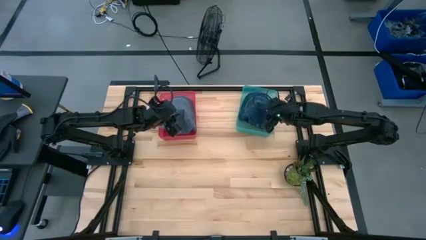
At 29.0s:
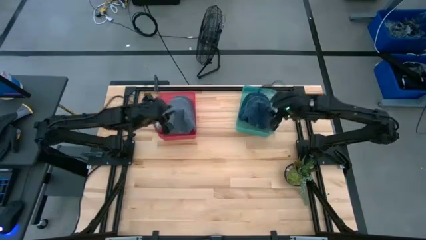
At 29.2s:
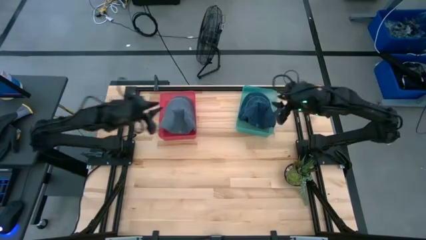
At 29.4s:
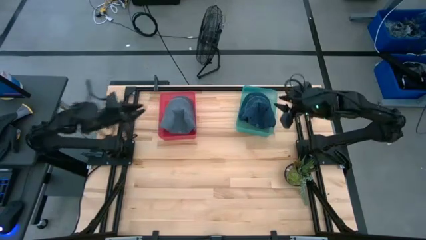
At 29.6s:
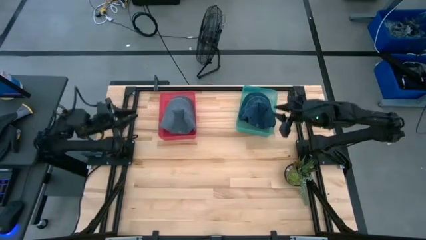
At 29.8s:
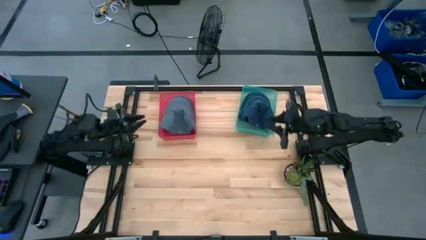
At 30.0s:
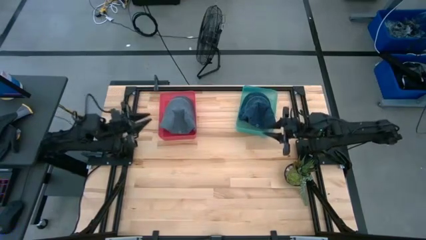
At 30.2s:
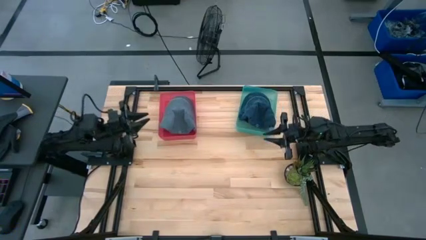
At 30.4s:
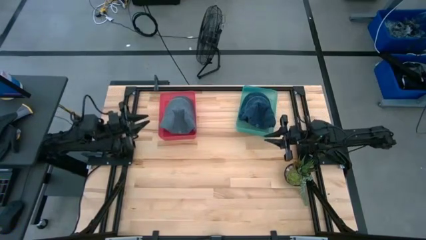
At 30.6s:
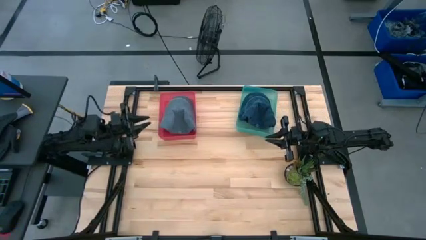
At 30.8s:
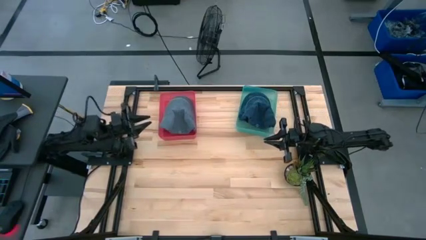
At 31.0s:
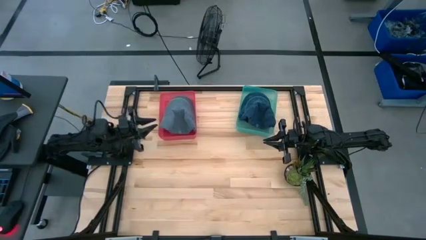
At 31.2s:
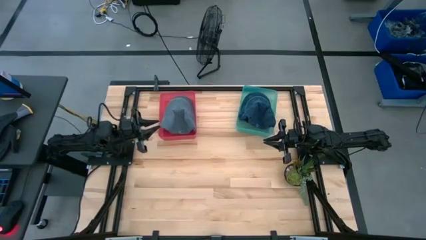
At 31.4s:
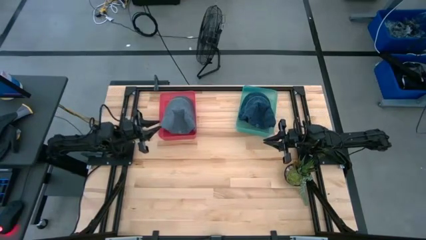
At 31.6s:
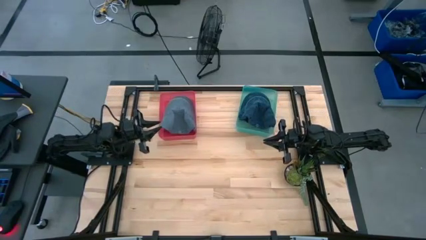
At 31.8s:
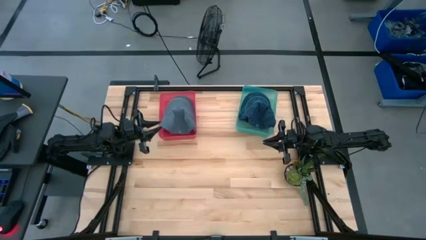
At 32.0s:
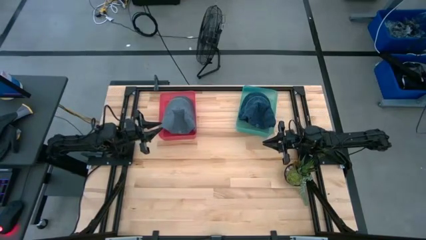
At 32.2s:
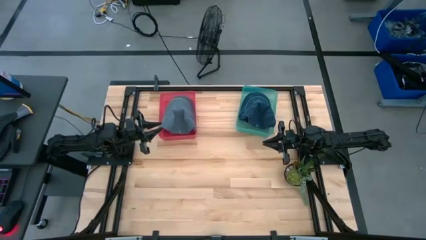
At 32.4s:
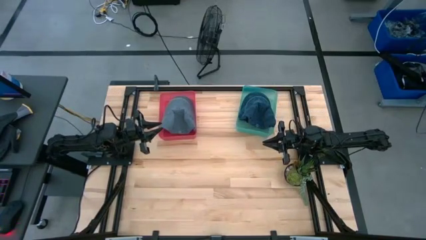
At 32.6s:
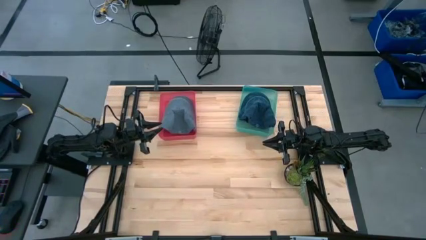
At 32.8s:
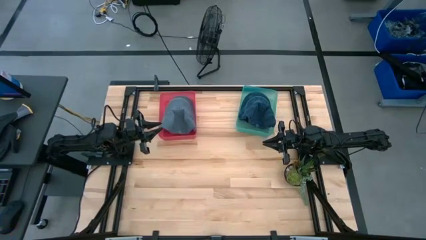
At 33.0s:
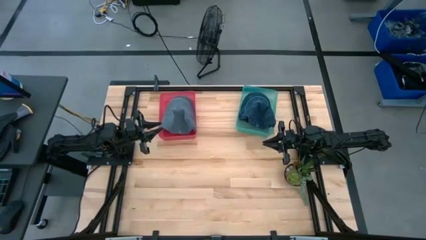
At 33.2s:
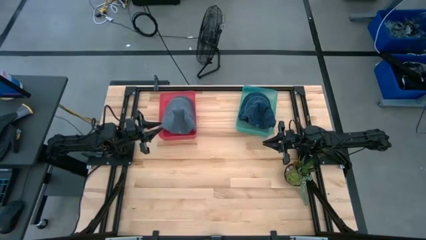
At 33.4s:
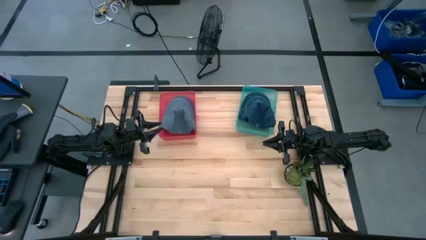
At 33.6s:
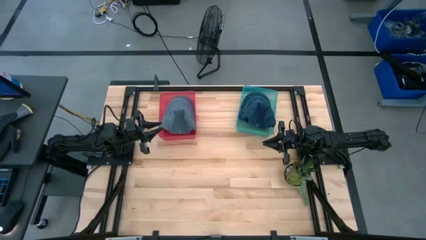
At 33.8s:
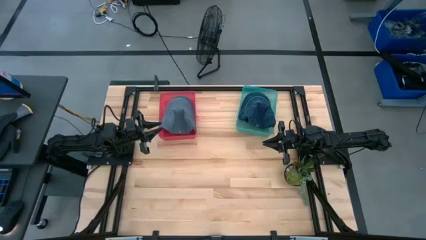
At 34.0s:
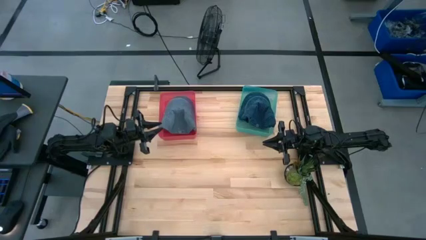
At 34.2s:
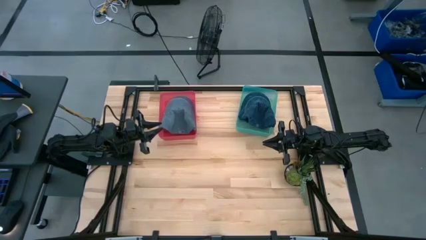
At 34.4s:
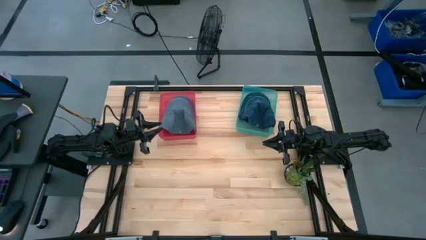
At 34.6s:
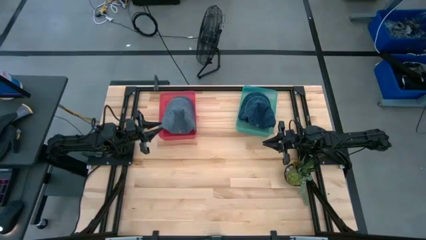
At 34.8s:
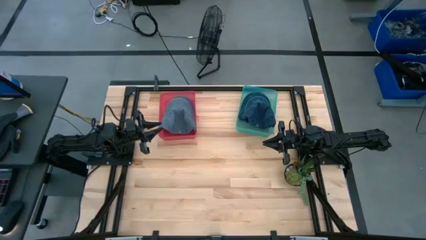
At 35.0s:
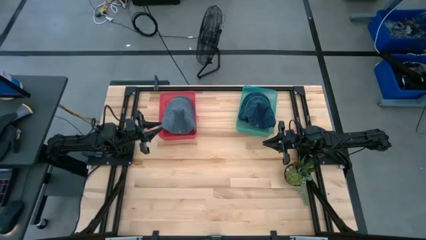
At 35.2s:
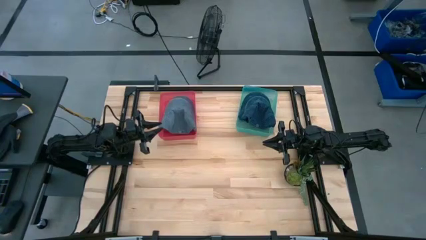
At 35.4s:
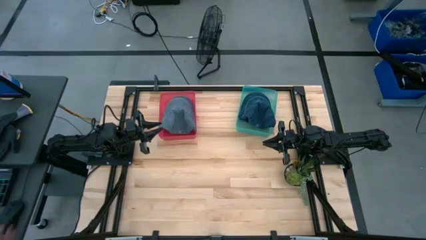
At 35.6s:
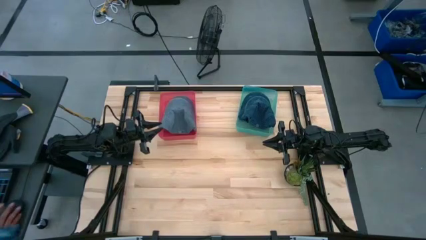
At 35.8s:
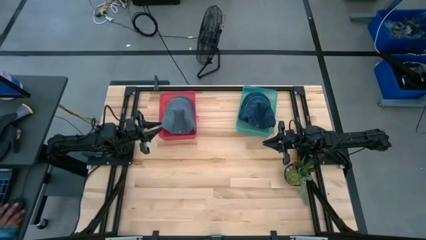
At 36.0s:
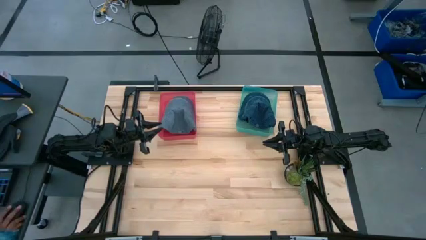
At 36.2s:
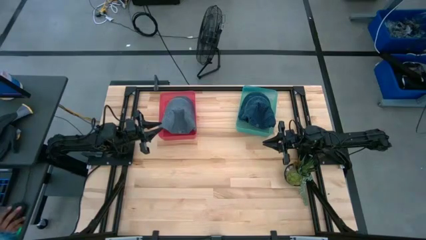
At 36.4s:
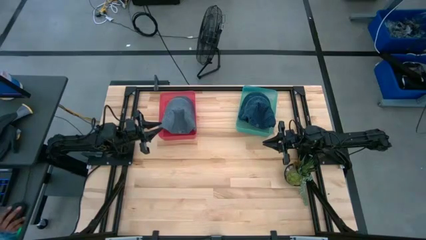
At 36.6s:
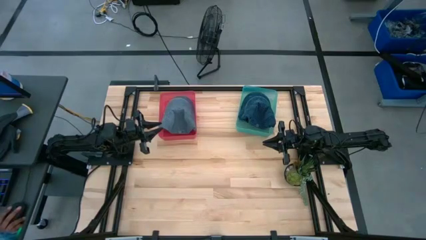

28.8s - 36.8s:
Task: Pick & Place hat
Return to Home Position

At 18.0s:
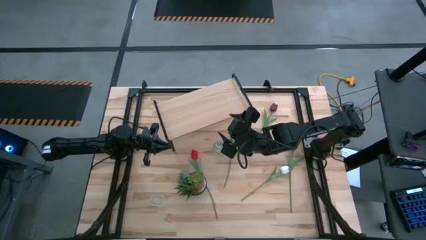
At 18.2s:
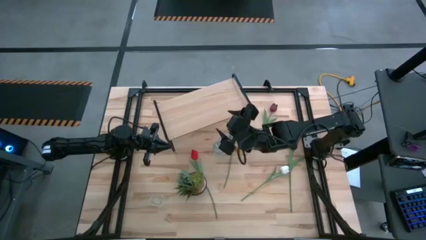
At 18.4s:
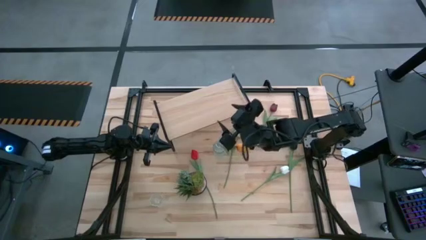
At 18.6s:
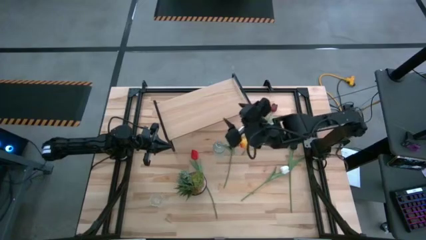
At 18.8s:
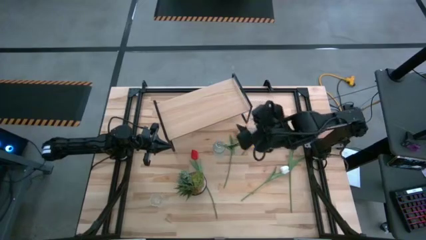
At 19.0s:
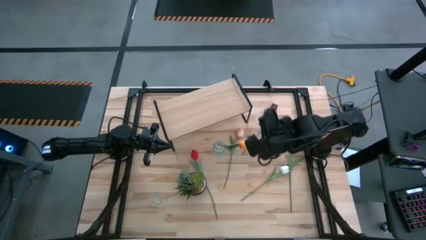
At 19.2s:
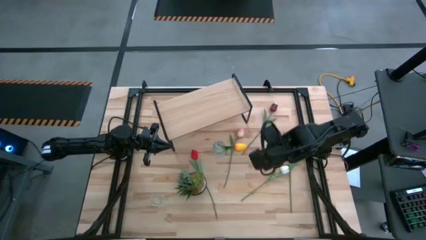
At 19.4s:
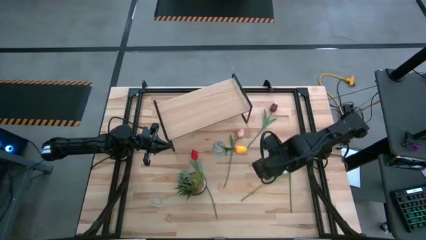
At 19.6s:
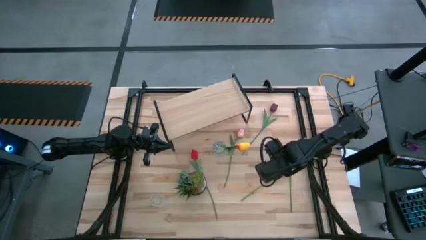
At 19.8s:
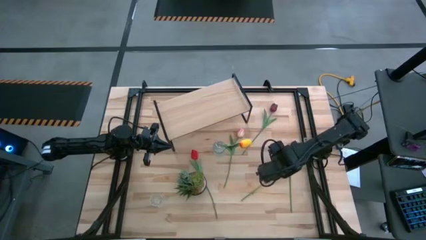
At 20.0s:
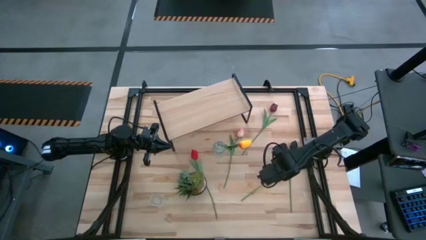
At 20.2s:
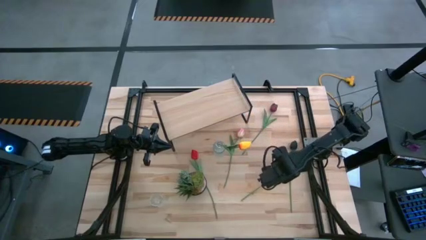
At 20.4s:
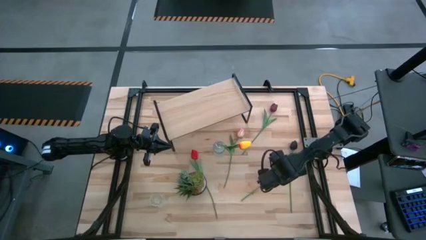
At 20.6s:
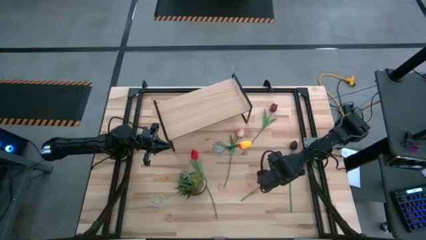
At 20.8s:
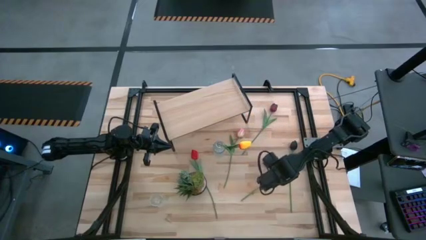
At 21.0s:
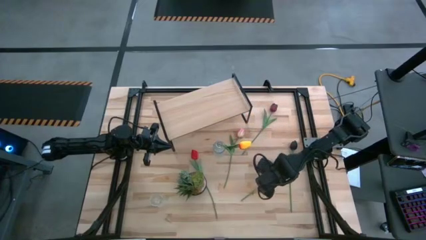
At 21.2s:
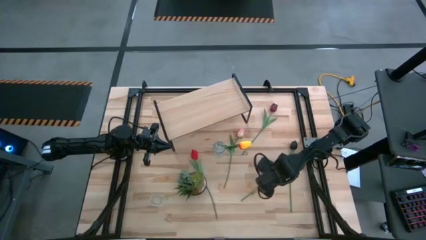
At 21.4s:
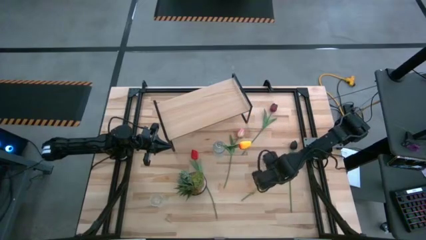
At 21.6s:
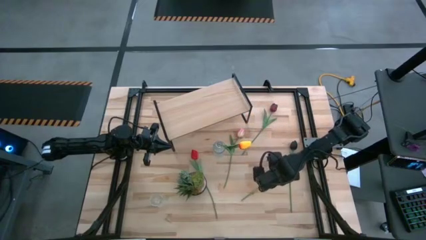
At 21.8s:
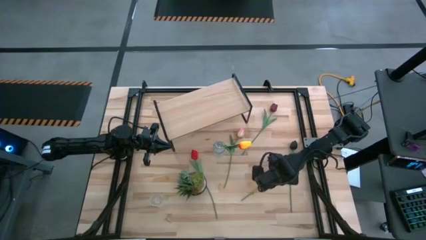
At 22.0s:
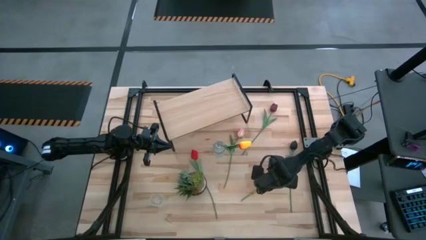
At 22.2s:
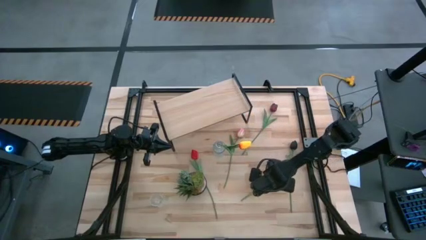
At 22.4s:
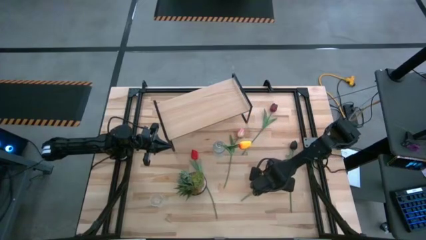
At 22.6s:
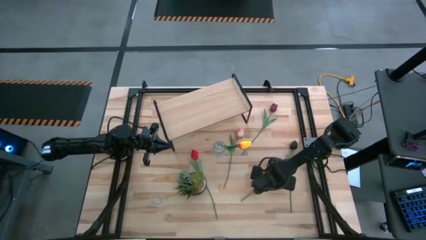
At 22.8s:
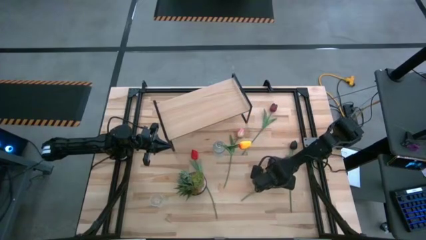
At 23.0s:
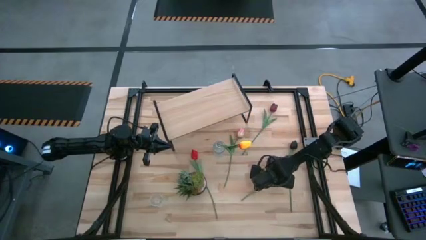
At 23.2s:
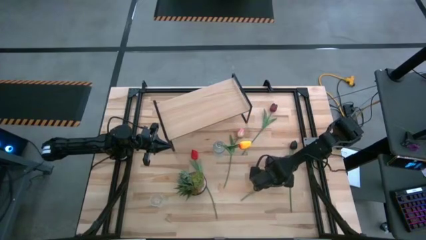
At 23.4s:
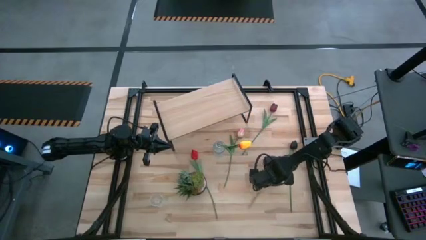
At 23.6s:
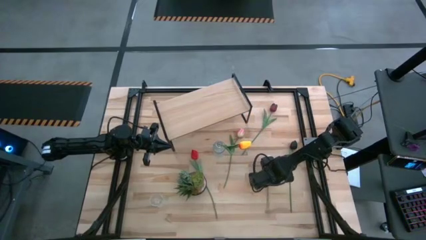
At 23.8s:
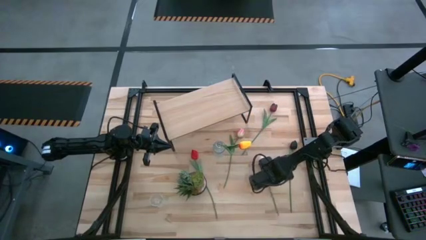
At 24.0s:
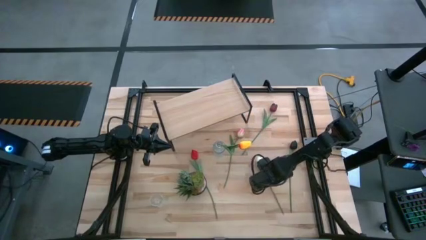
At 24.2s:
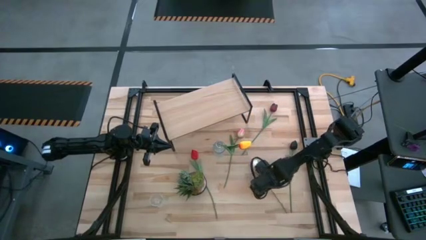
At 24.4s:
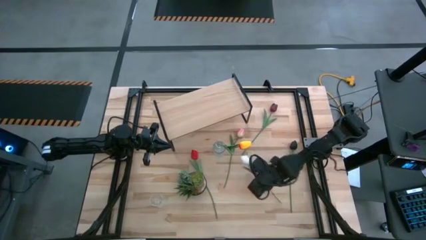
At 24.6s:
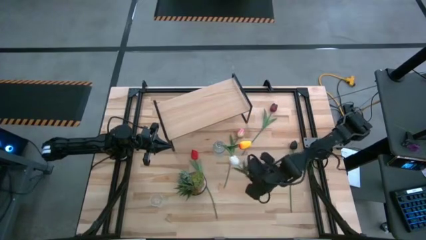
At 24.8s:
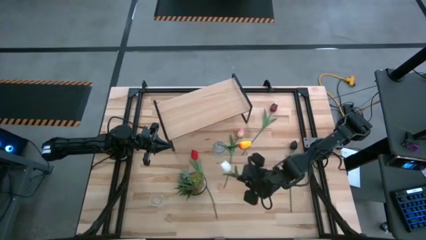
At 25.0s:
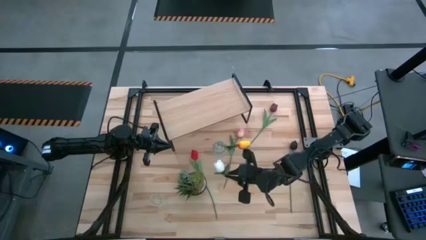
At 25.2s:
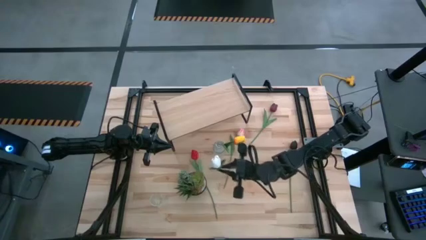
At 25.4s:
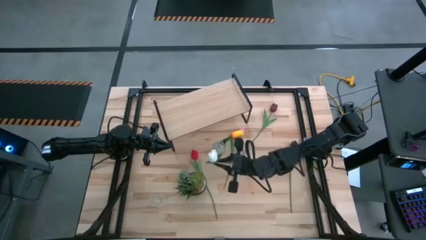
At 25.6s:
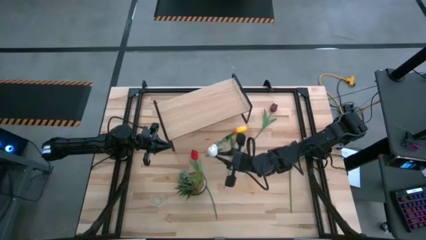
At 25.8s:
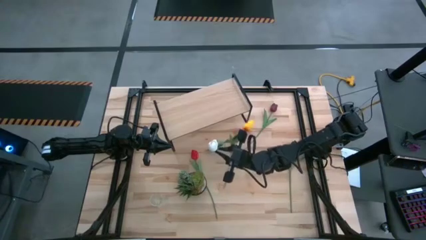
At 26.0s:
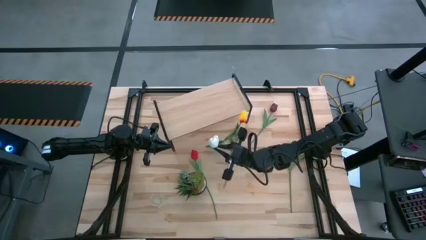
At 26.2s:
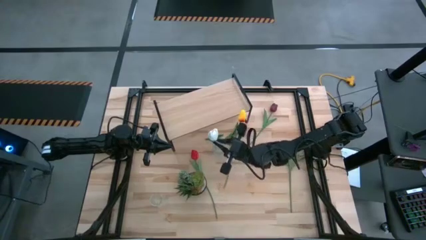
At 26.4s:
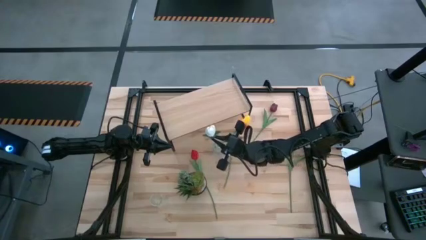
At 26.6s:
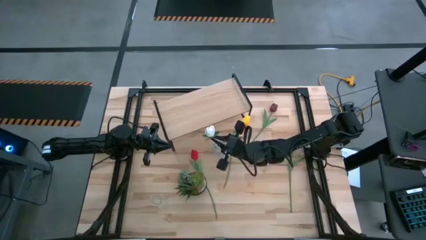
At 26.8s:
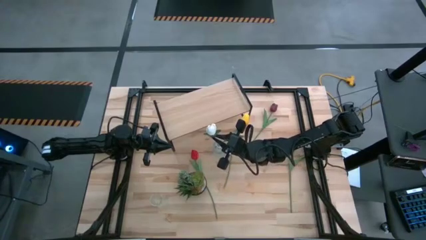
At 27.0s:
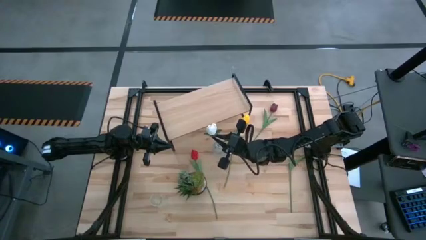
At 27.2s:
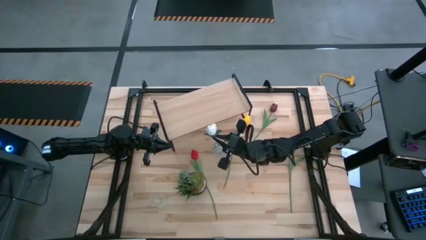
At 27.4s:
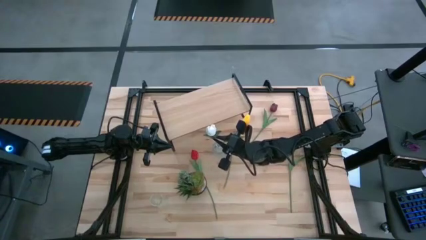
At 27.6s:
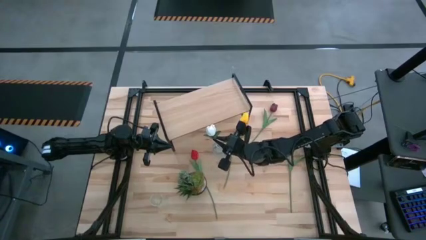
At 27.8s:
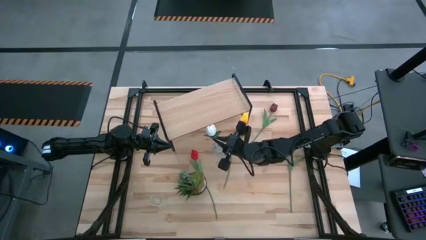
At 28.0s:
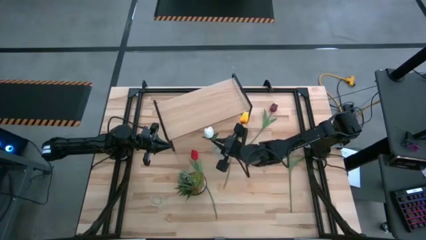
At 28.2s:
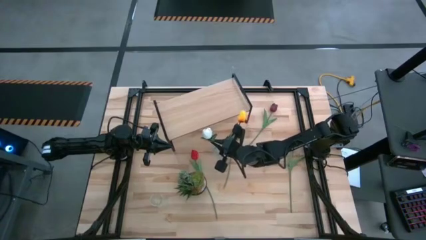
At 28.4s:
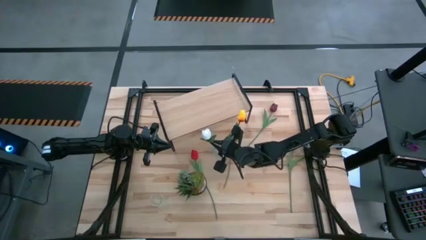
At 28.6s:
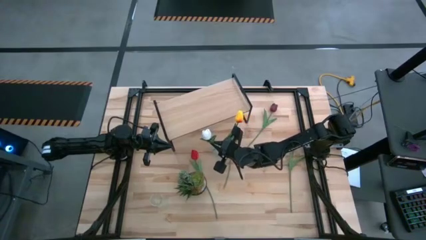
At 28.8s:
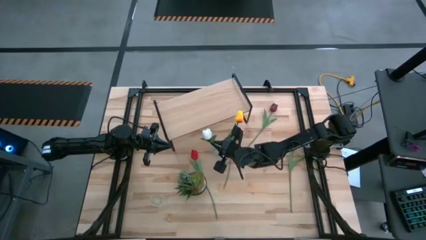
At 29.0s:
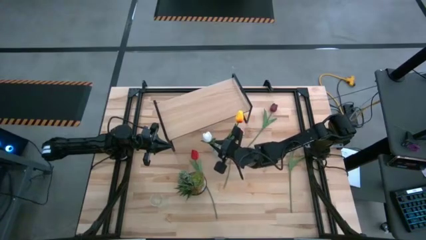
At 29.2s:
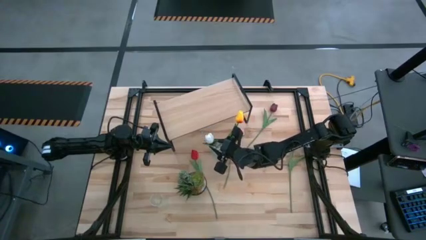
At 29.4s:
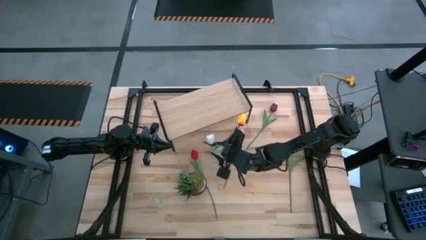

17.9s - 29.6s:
Task: Pick and place flowers into a vace then onto a shelf
Put the white tulip into the top transparent vase
